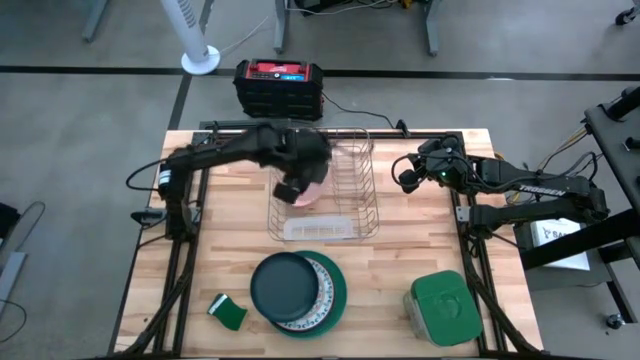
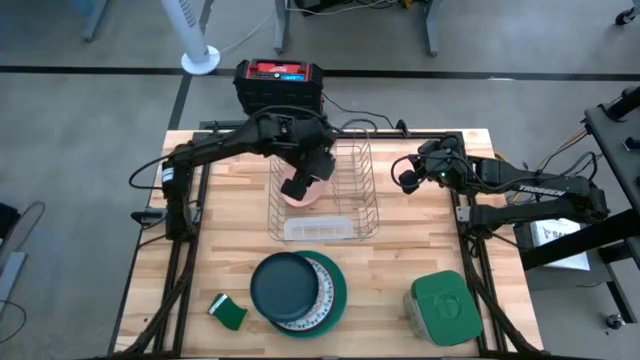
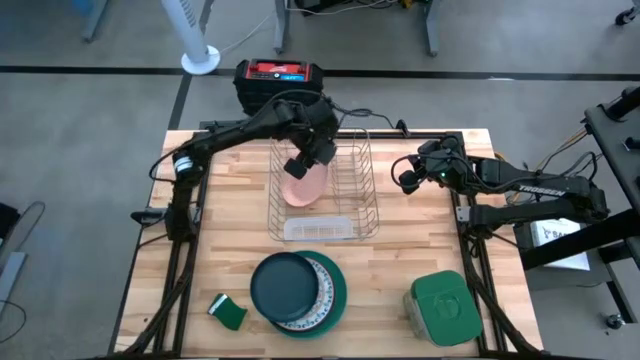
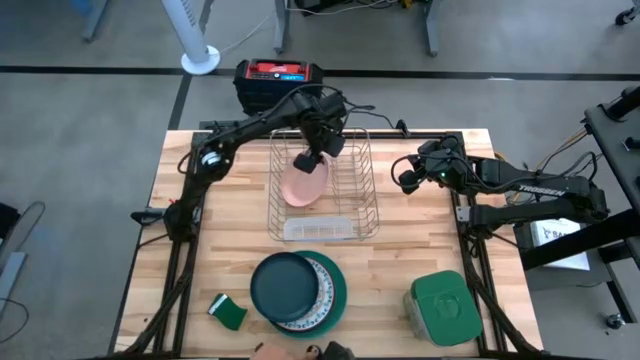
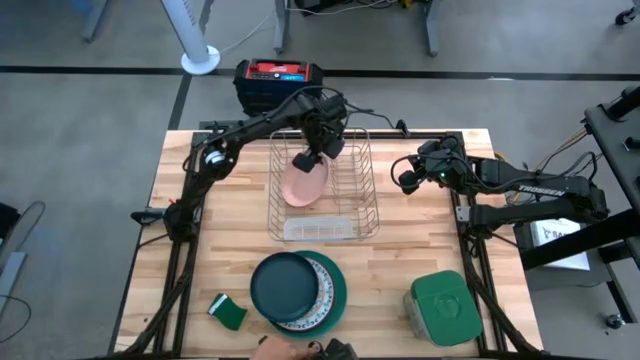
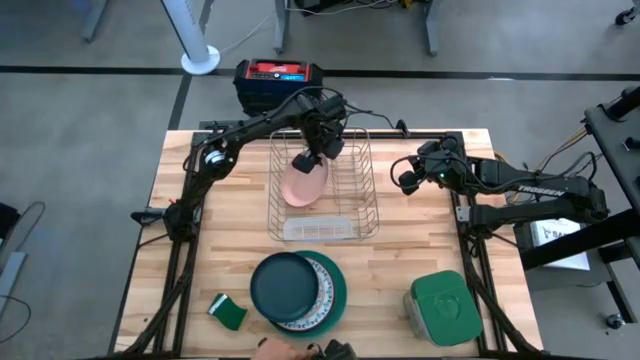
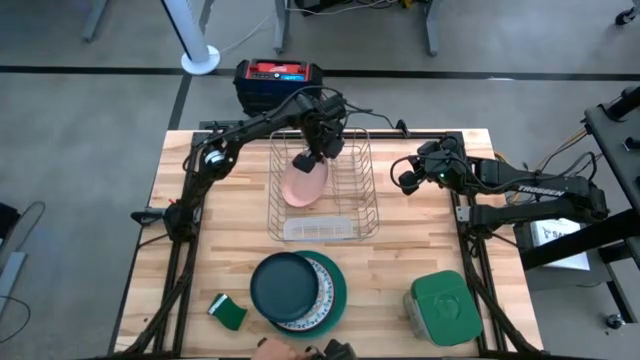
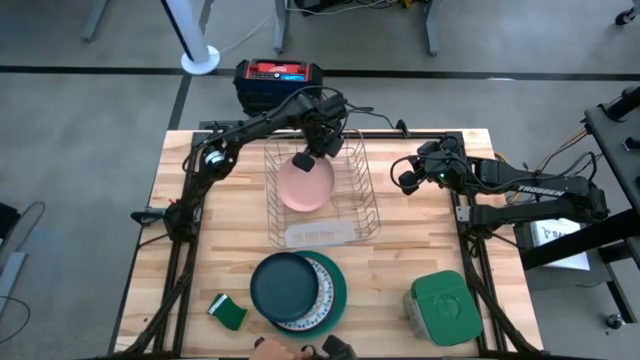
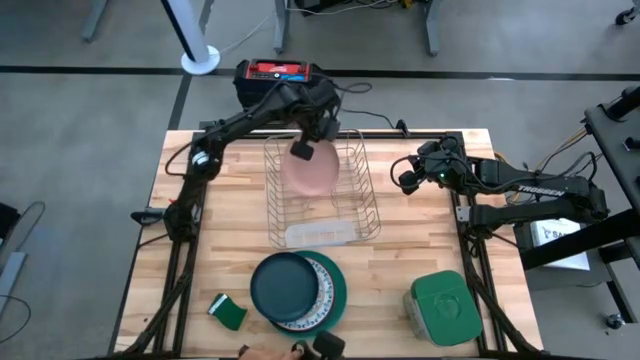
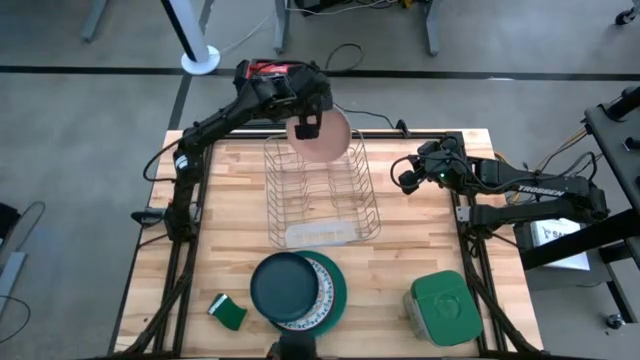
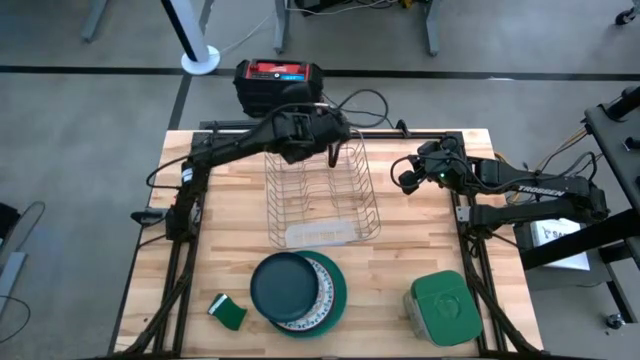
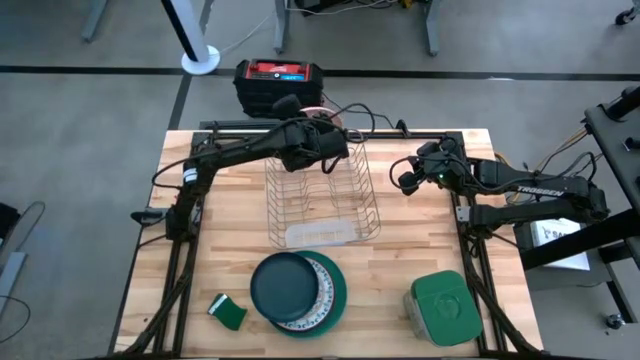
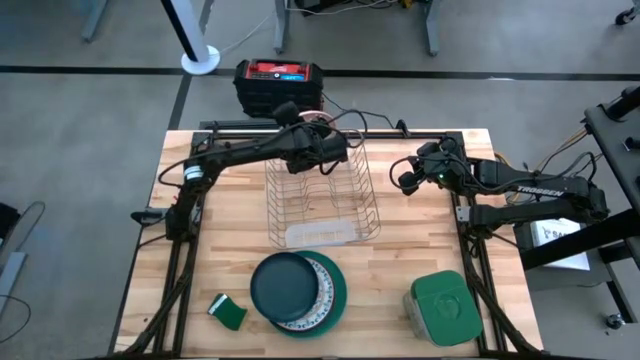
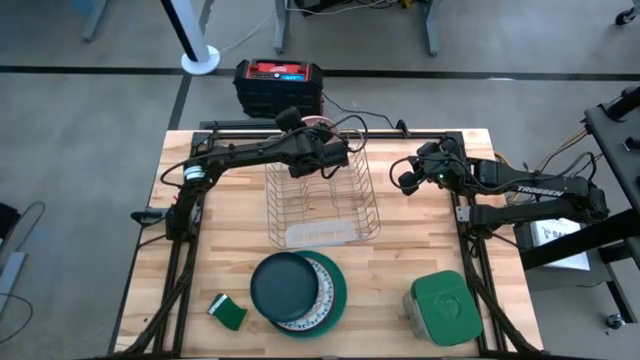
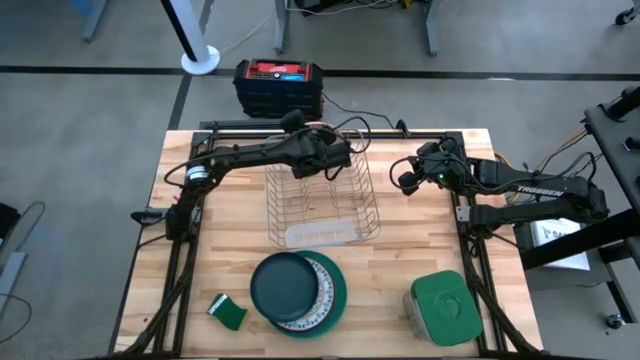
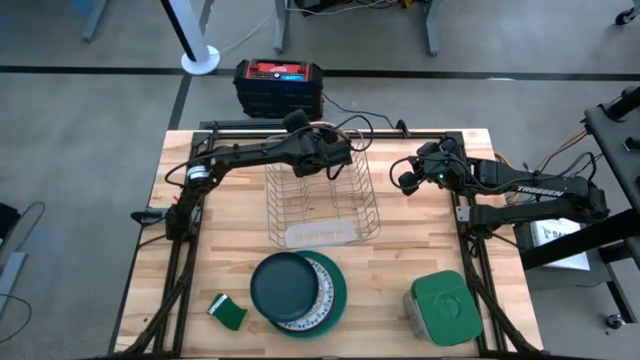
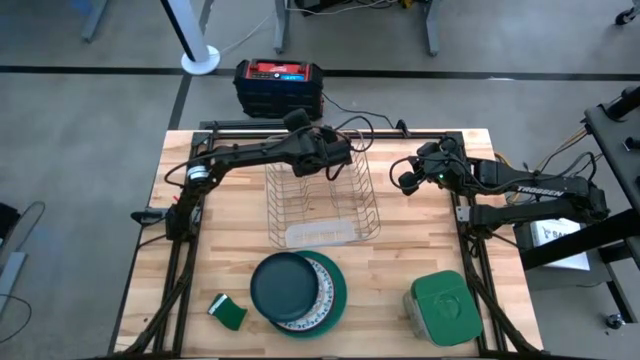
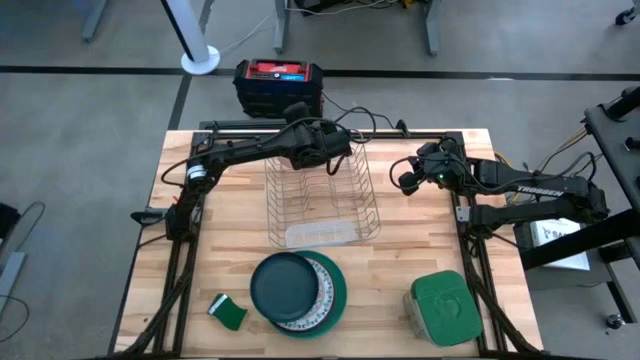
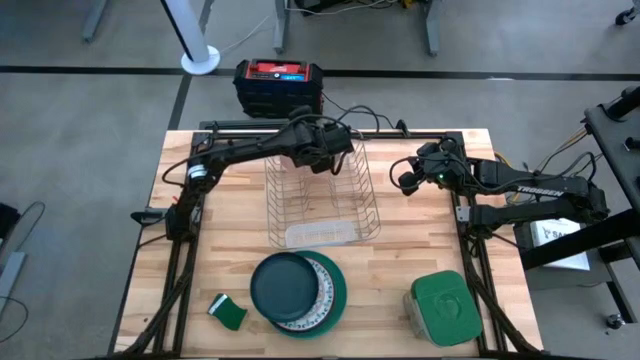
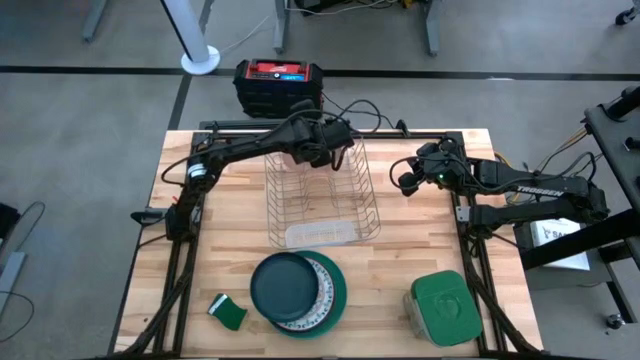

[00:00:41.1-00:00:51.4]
Task: Sort dishes
Put the pink plate in the dishwasher rack

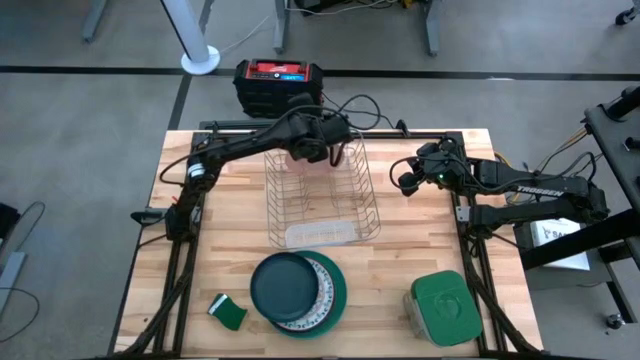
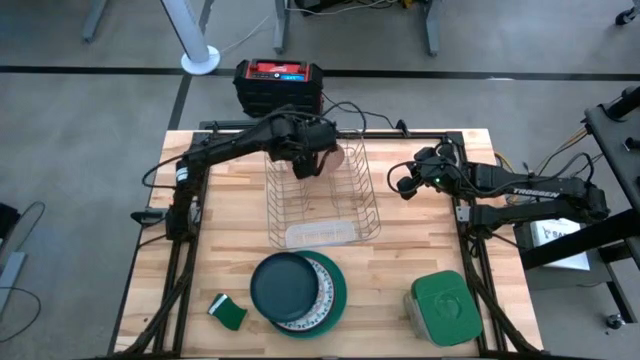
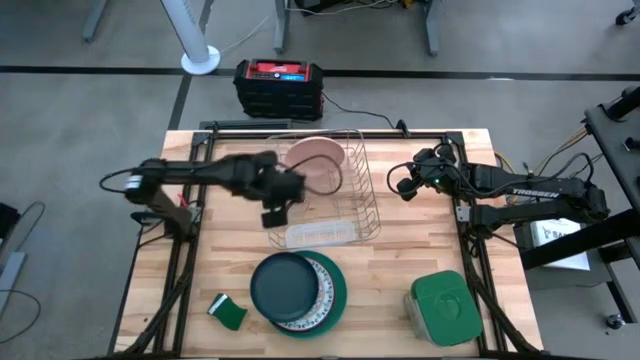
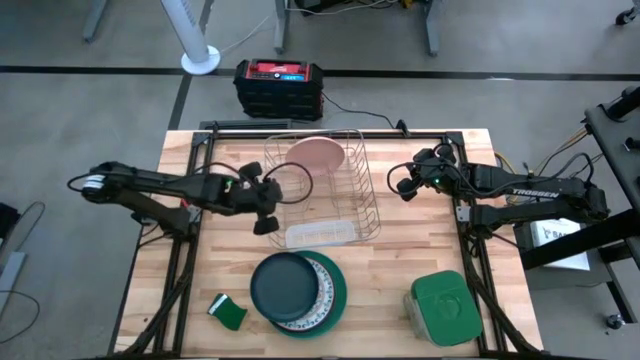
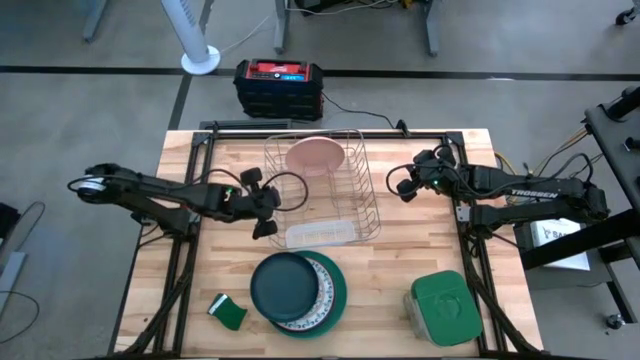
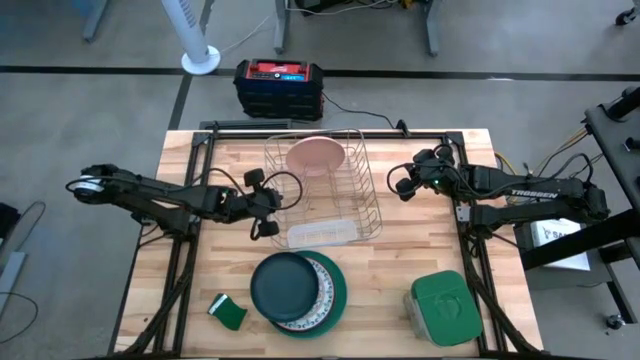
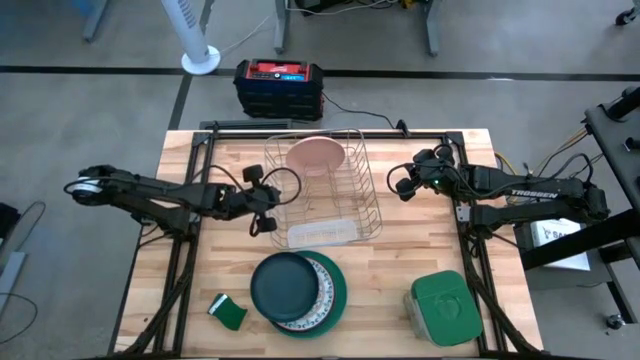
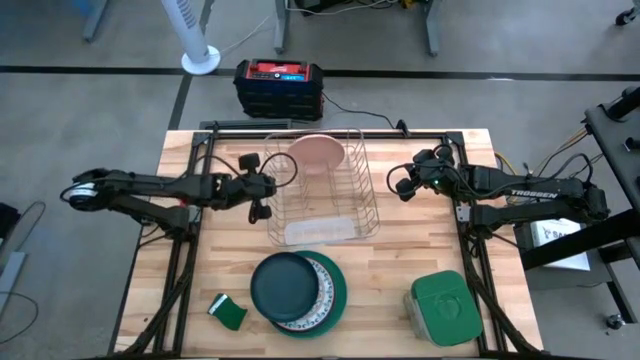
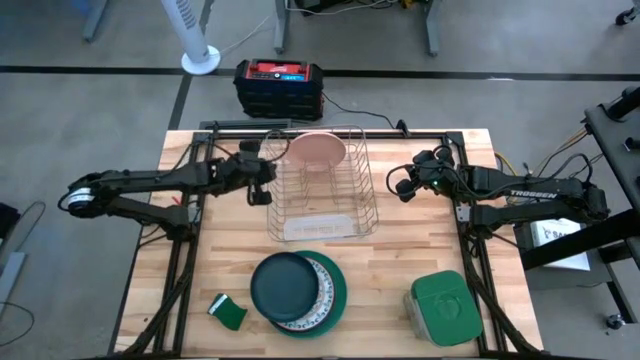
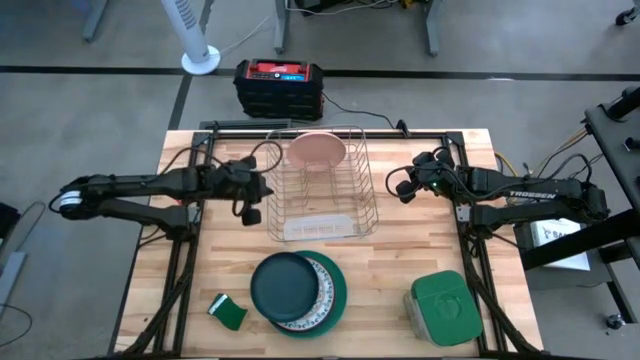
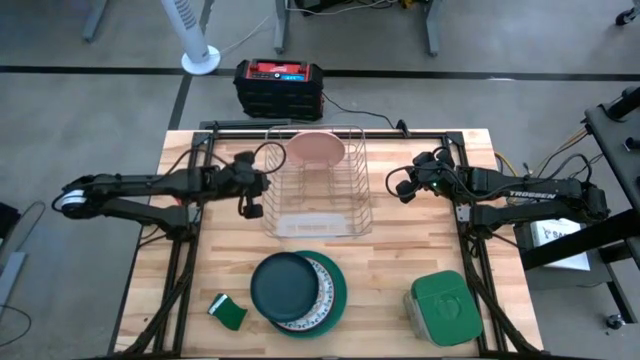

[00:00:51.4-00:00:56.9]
Adjust the dishwasher rack

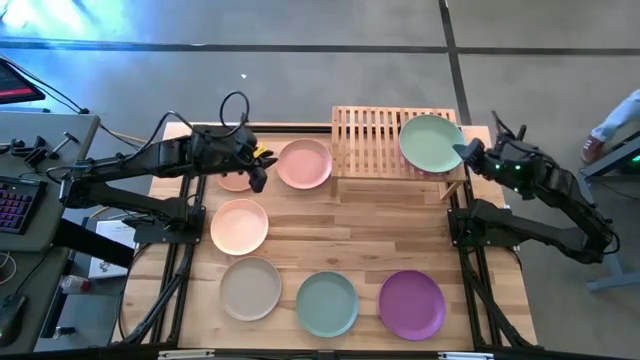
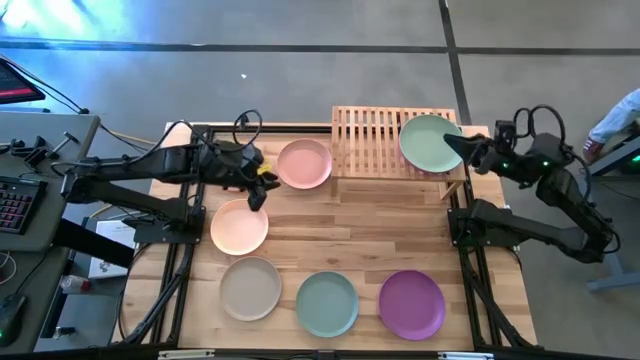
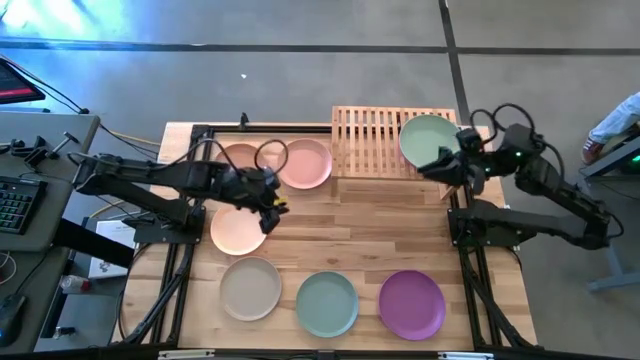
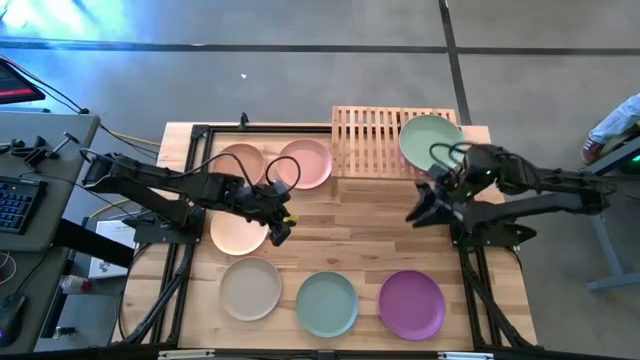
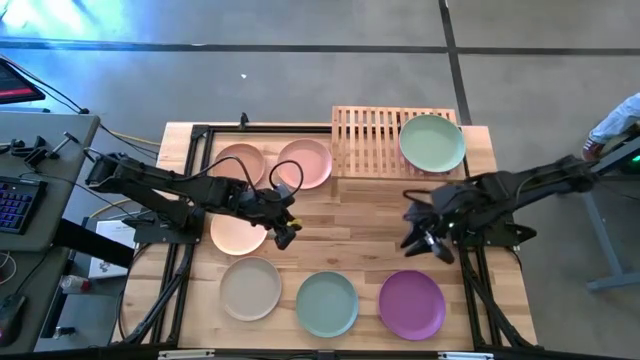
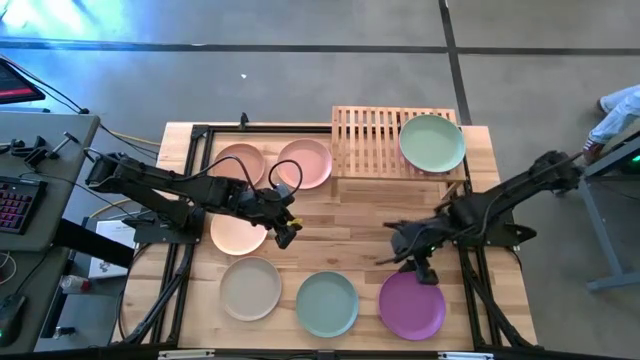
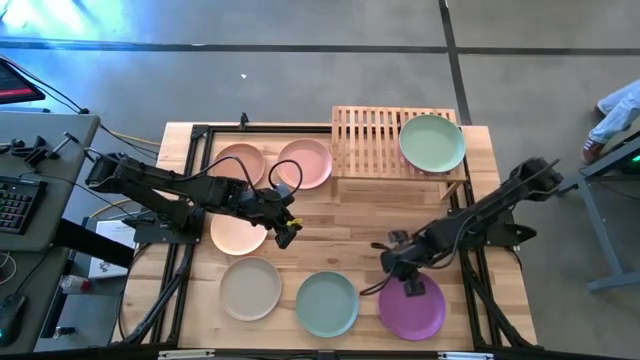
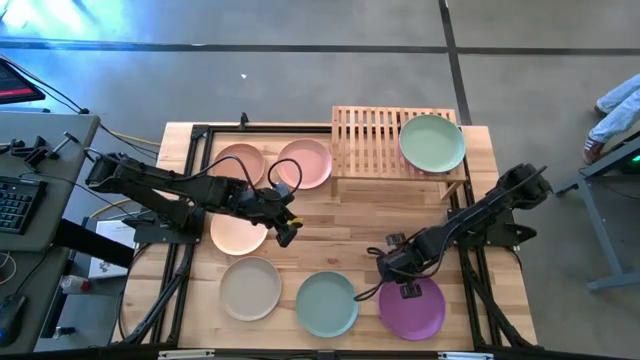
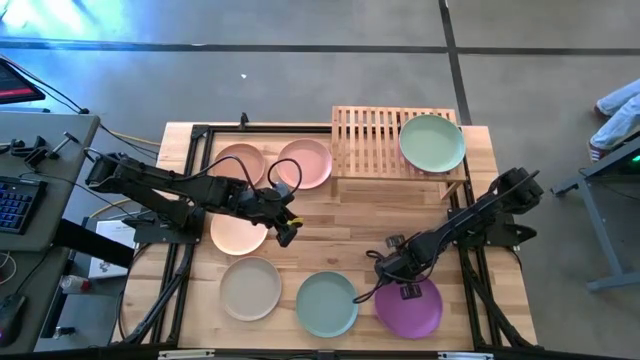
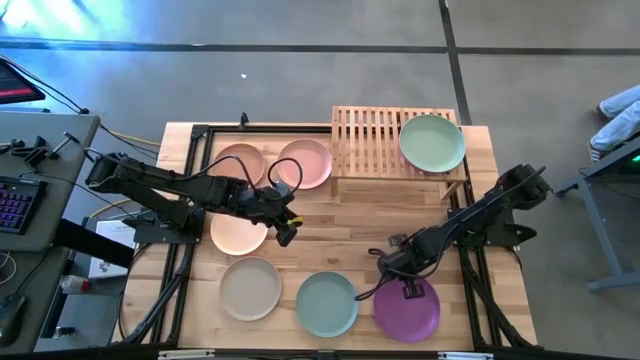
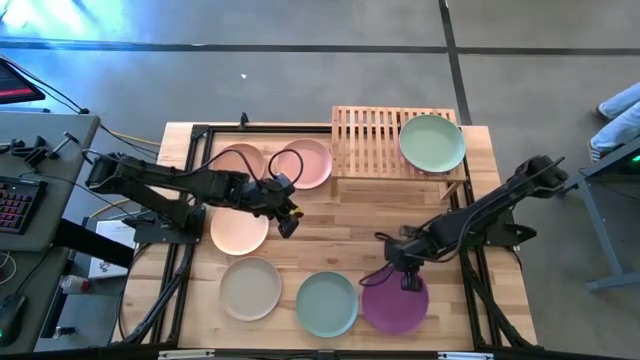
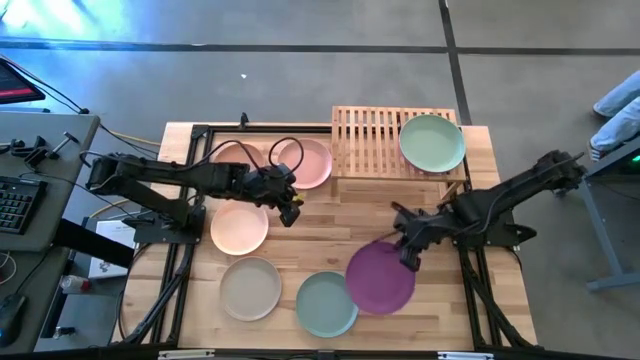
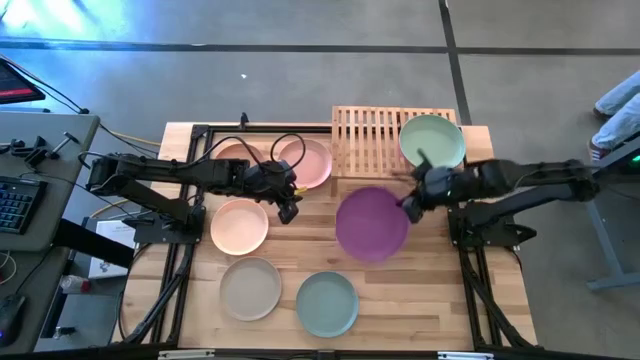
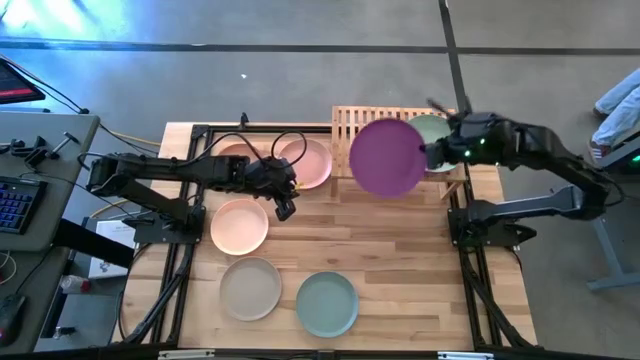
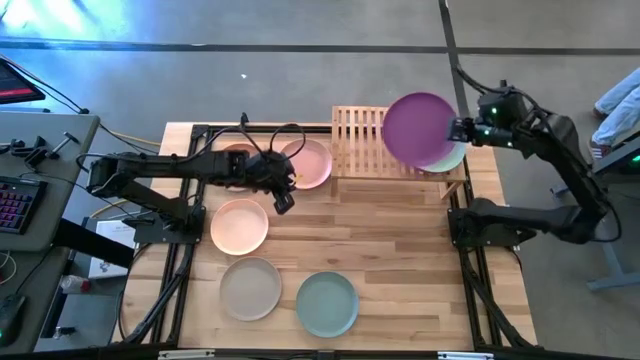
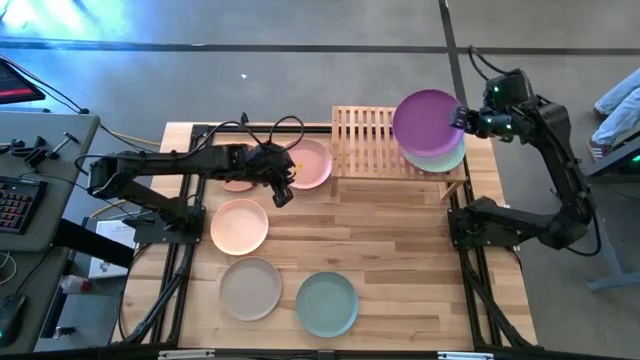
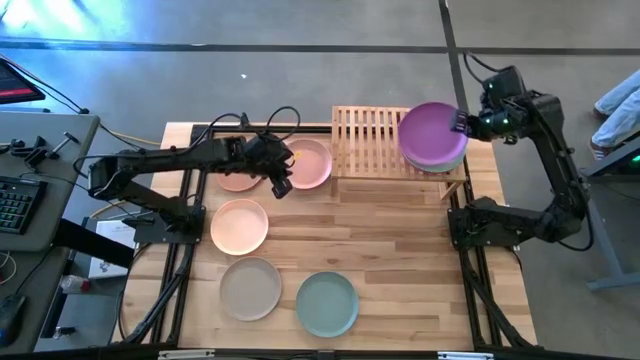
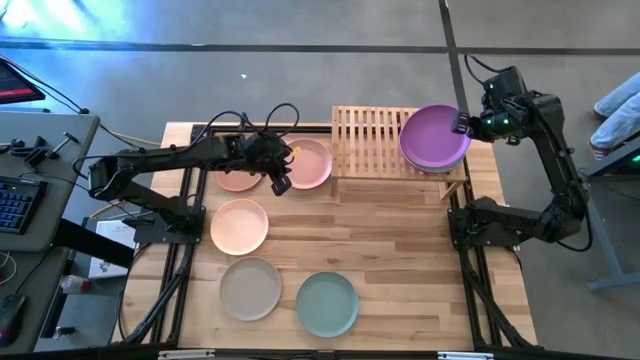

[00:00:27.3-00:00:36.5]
Task: Place and stack plates onto a shelf
Stack the purple plate on top of the green plate on the shelf
